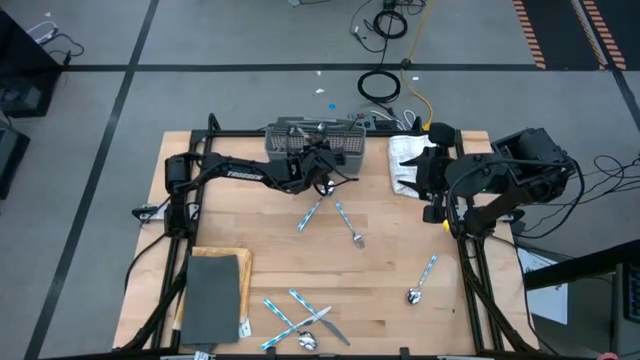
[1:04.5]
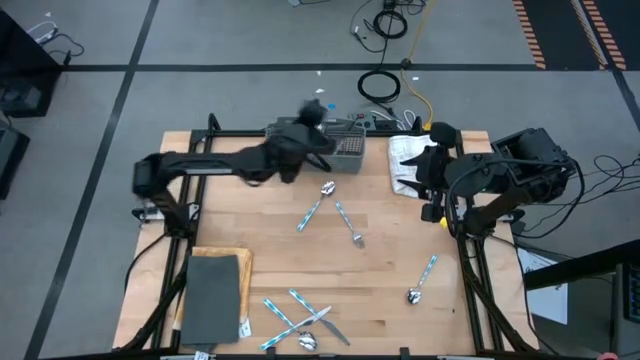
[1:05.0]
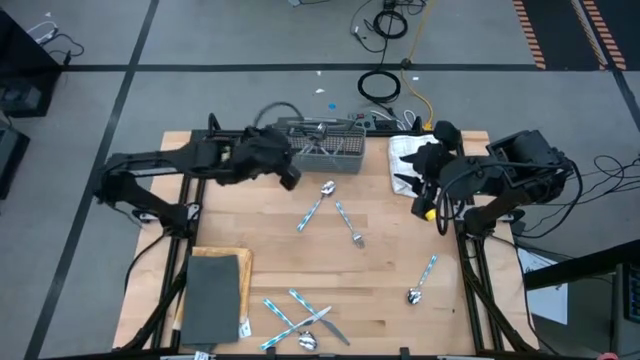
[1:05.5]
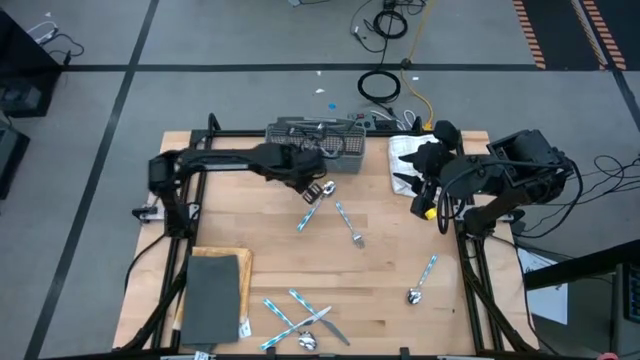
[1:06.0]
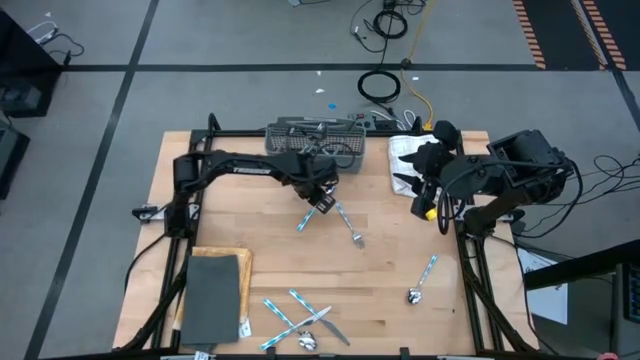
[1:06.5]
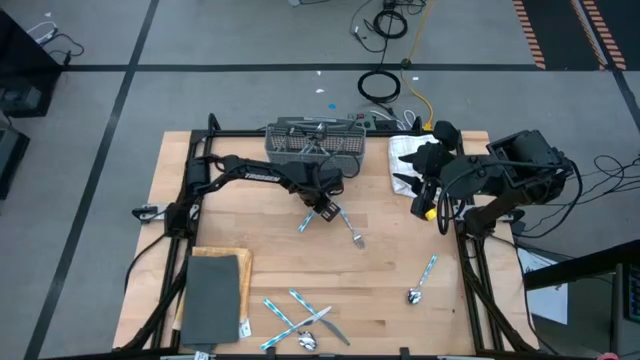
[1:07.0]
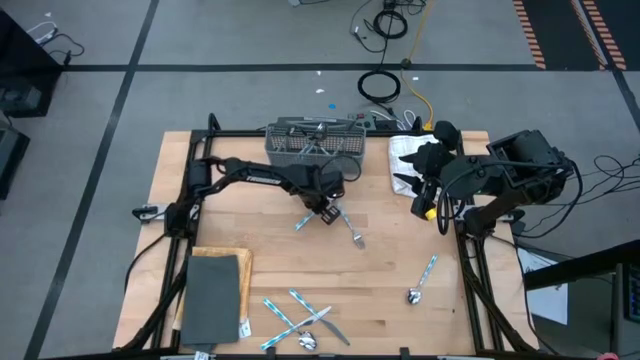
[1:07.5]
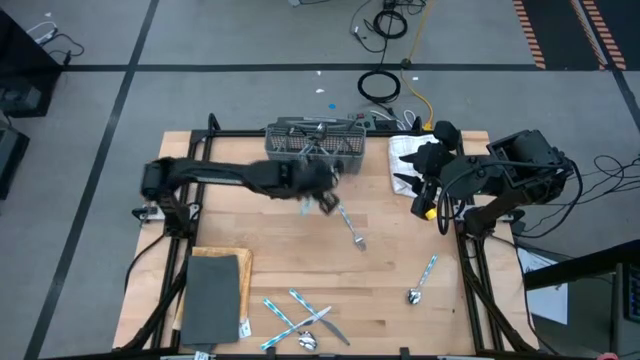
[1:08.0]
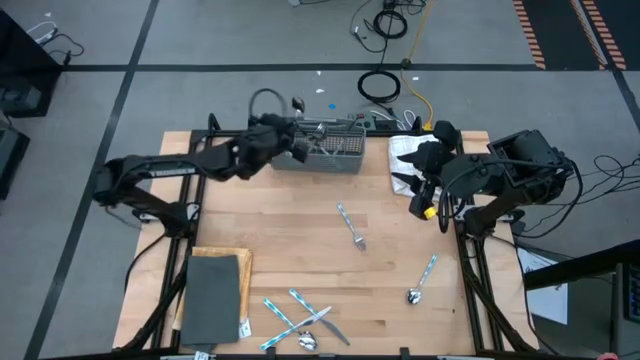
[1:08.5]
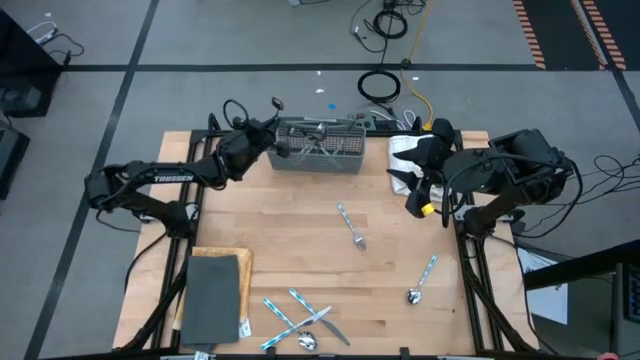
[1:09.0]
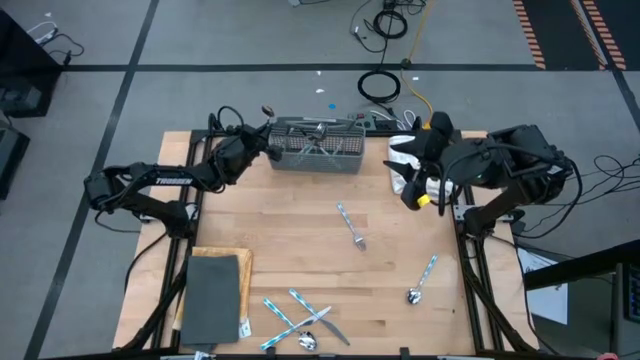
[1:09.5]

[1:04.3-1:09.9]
Task: Sort silverware
Put the blue spoon into the silverware basket

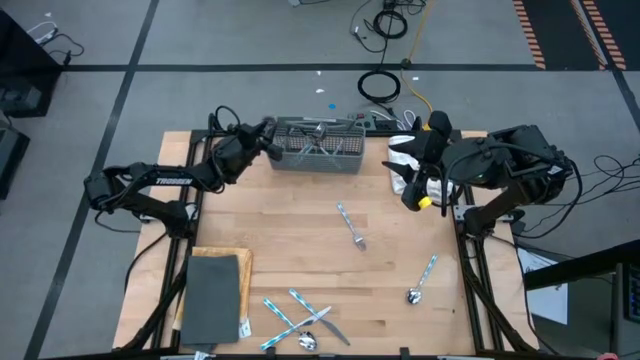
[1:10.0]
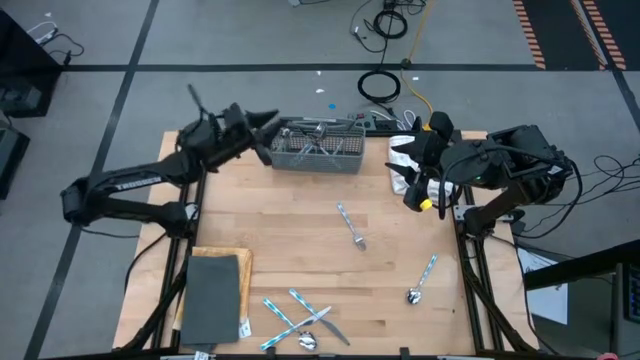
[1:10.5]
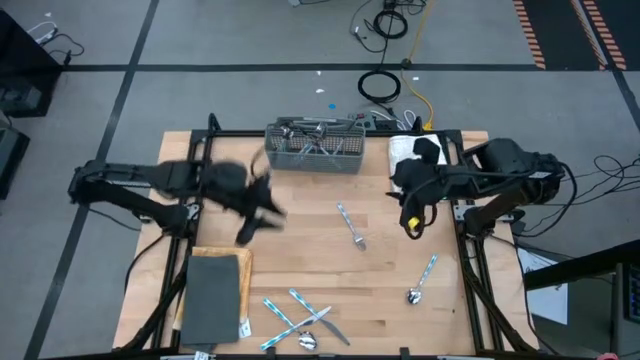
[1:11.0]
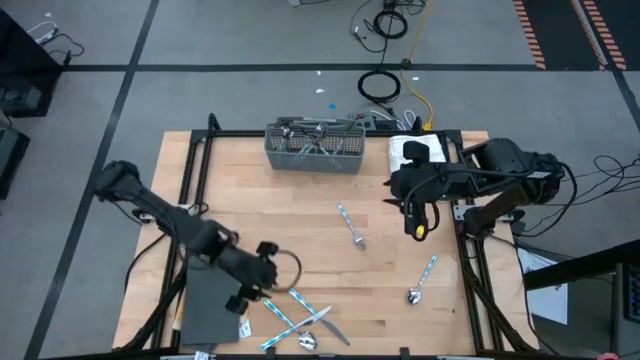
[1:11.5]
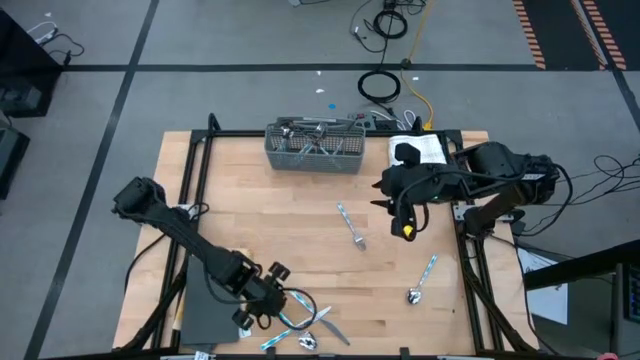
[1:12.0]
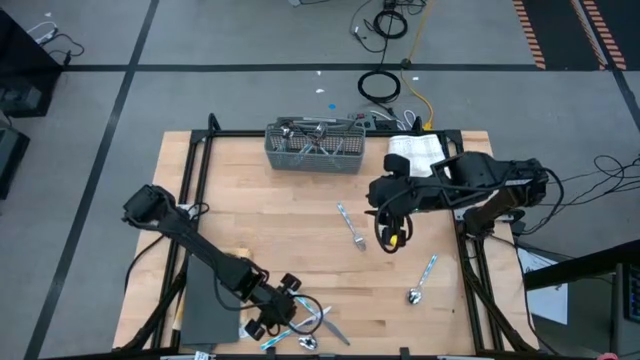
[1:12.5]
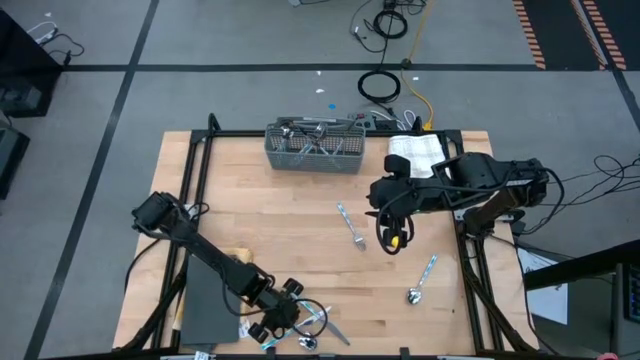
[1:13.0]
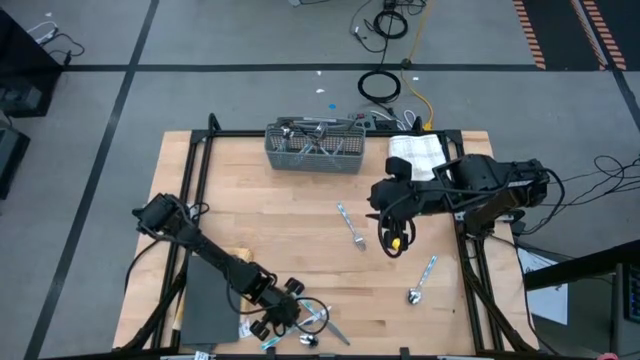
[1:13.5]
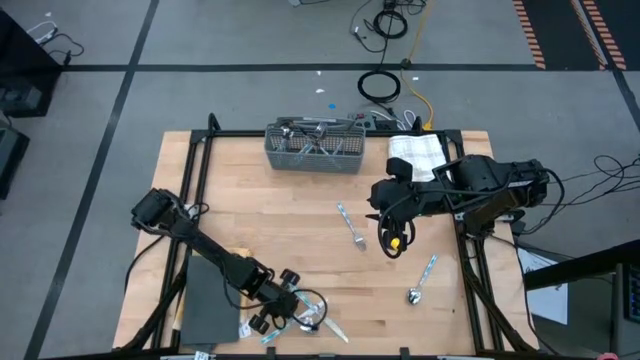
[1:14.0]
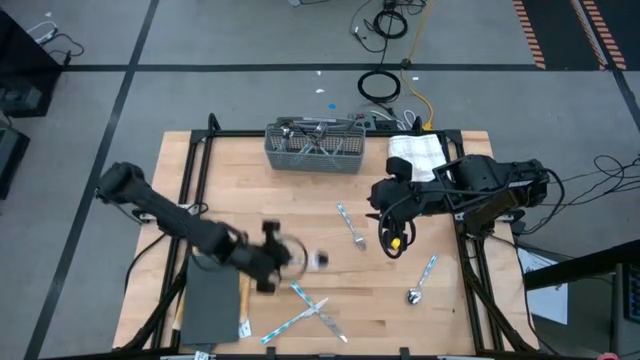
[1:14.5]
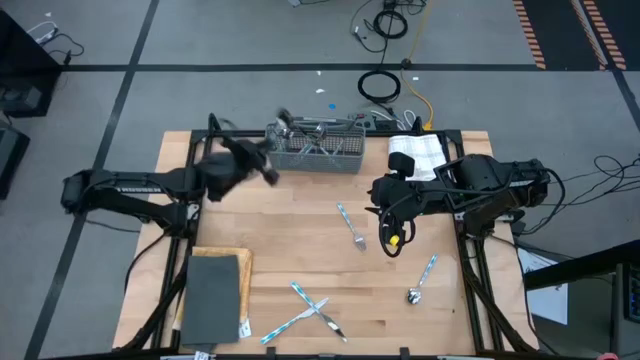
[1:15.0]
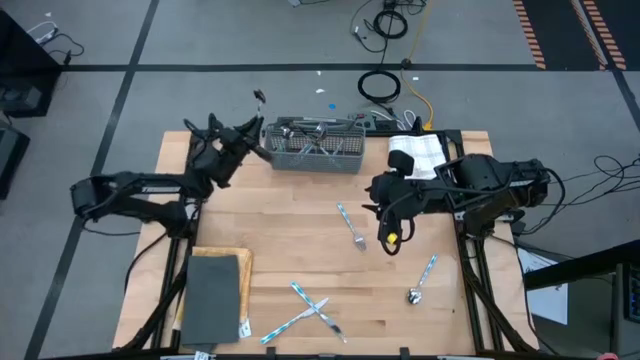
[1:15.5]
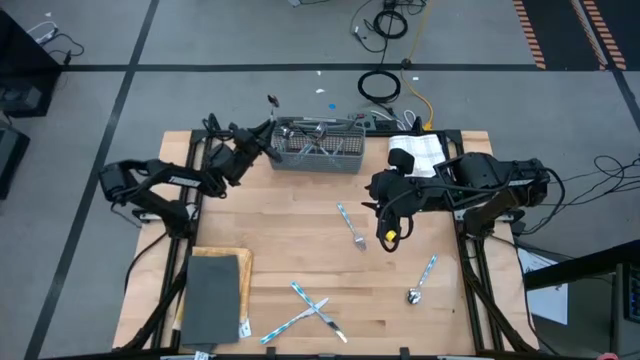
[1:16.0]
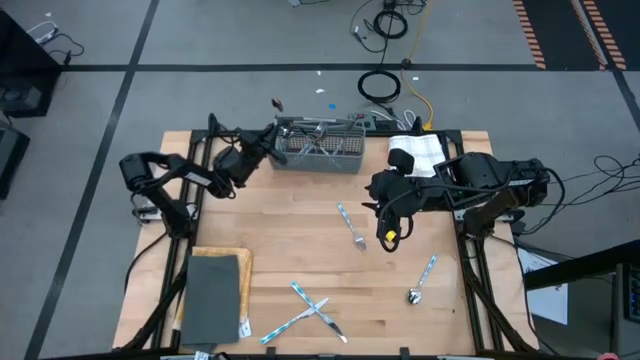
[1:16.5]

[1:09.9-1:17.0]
Put the blue spoon into the silverware basket

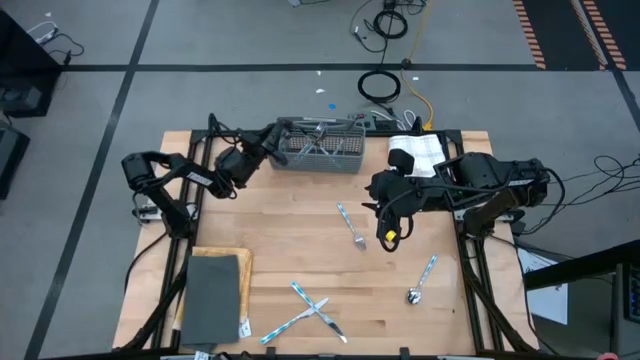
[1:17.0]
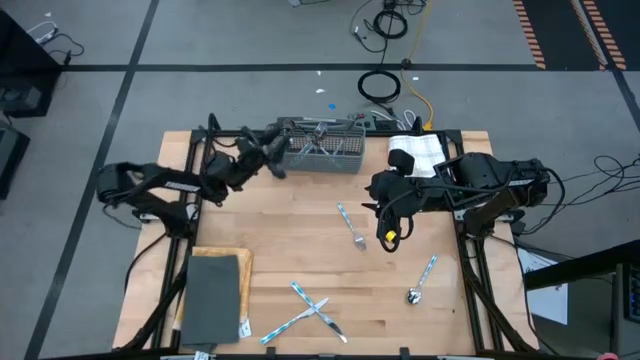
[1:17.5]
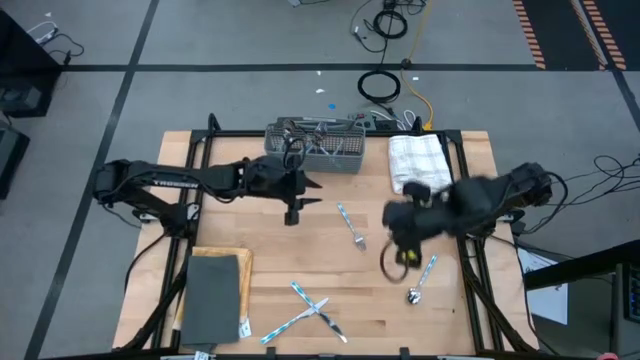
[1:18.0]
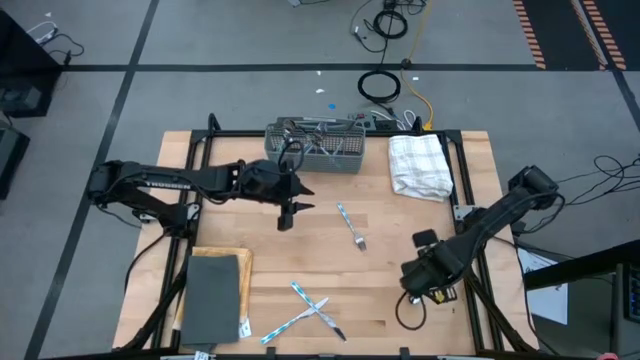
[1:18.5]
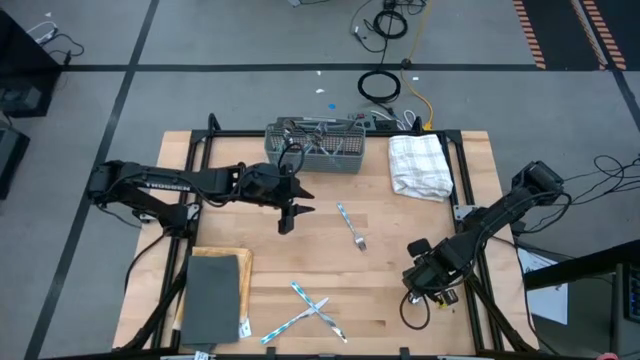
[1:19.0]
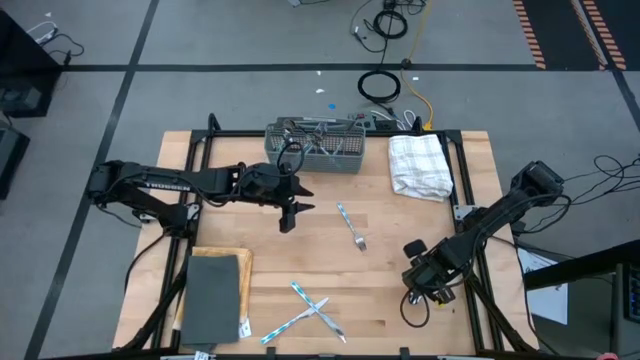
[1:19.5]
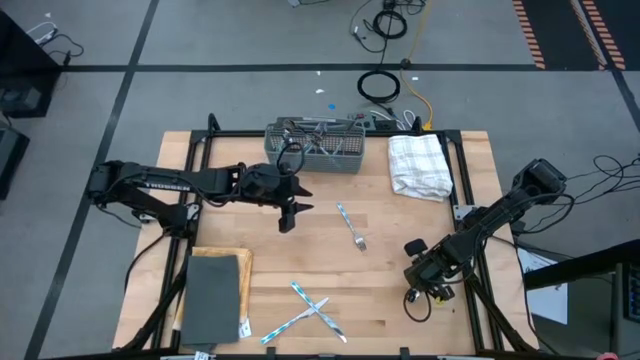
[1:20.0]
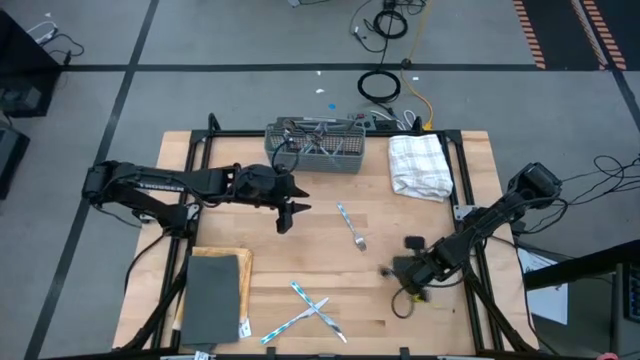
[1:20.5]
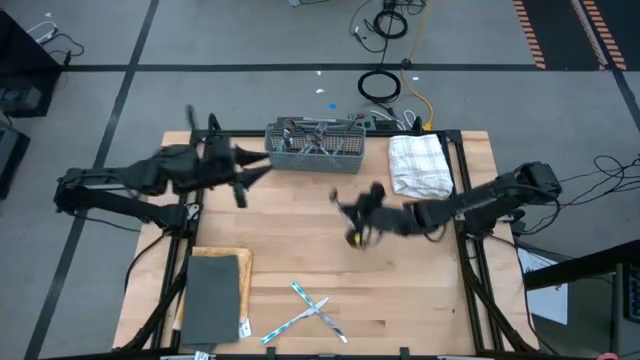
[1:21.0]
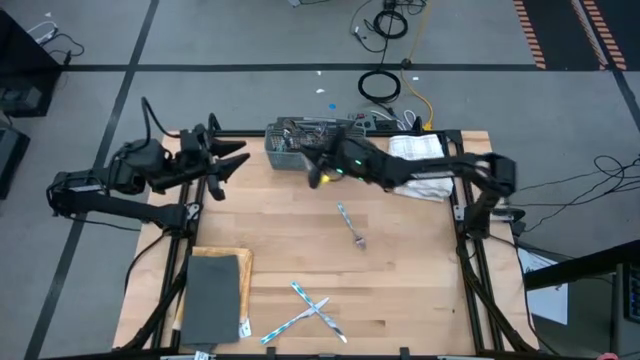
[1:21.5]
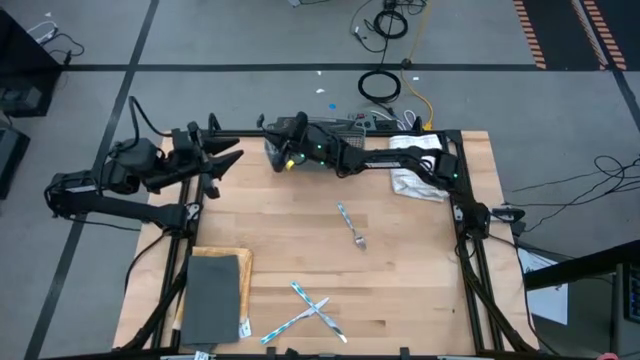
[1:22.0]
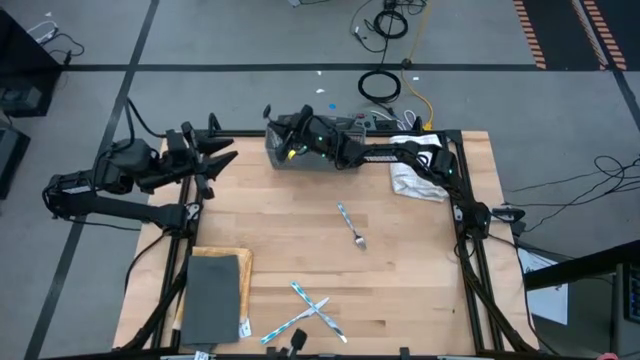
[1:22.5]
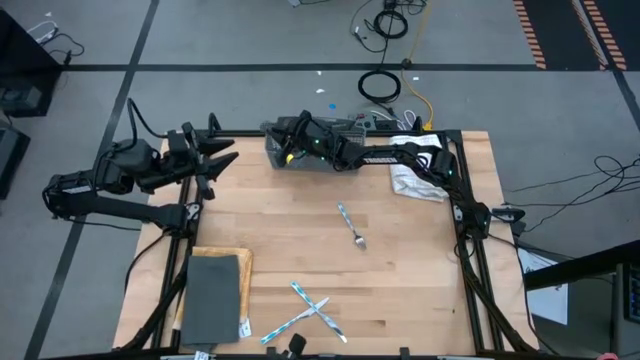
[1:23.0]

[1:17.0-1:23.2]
Put the blue spoon into the silverware basket

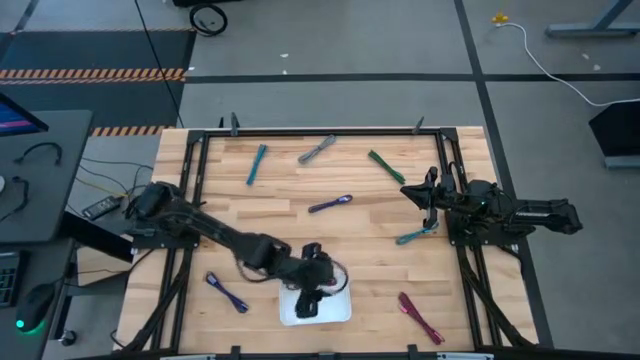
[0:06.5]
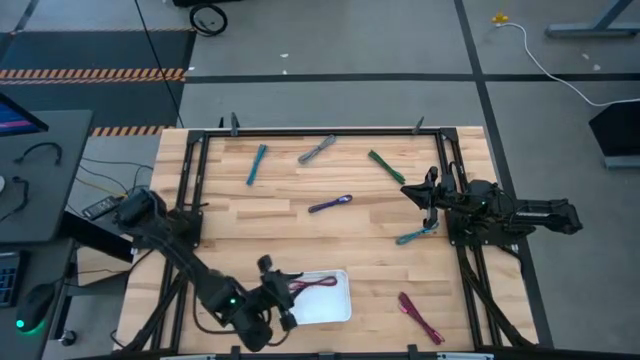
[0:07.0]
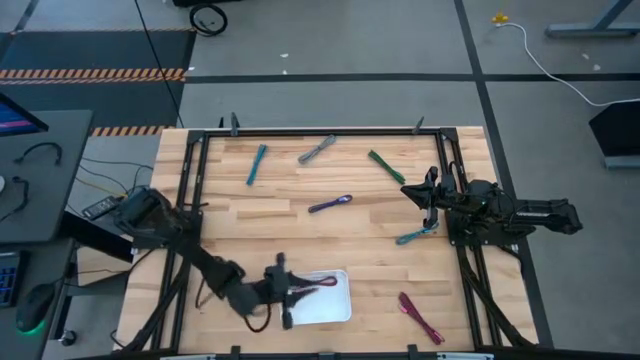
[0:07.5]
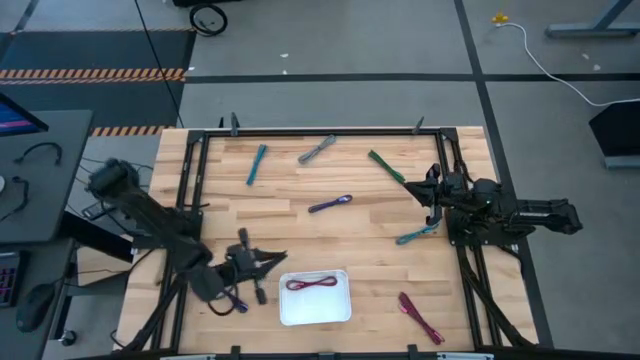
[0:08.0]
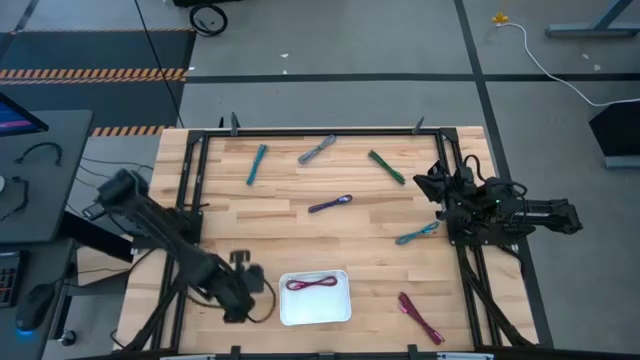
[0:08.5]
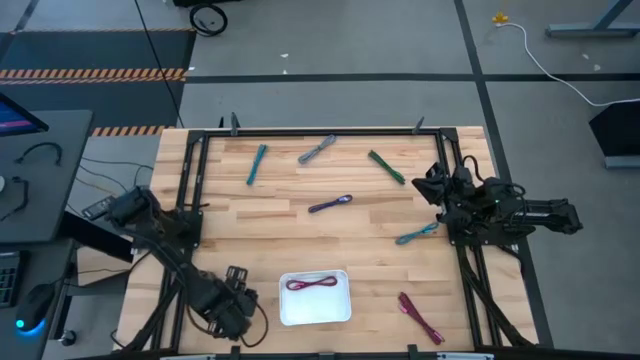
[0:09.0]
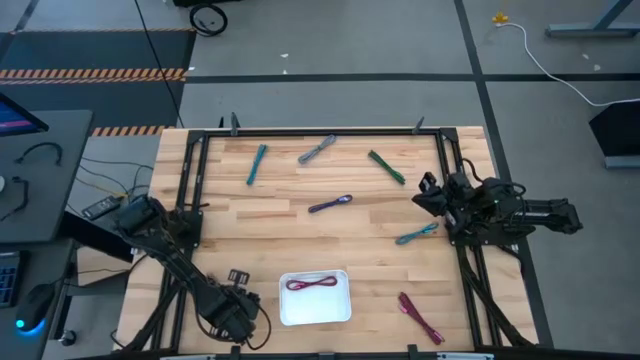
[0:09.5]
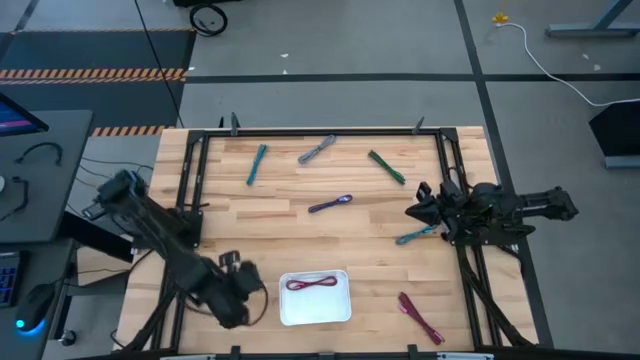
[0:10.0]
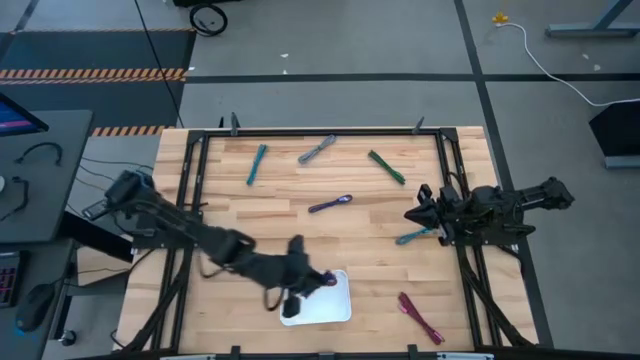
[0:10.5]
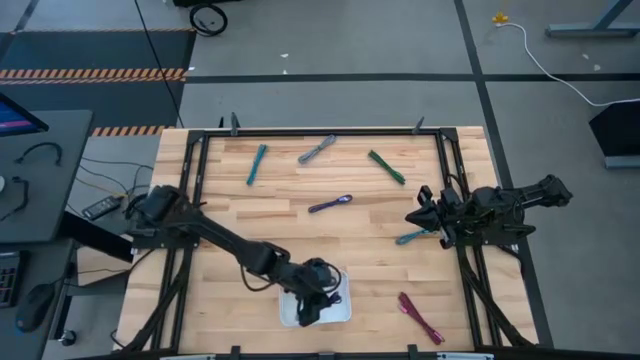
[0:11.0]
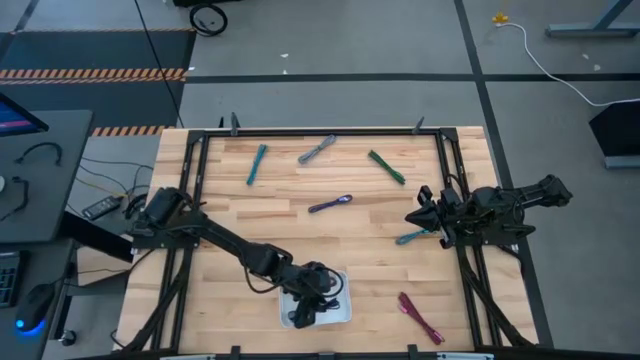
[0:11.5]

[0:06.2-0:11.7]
Task: Pick and place USB-C Cables
Put the bottom purple USB cable into the white bin
